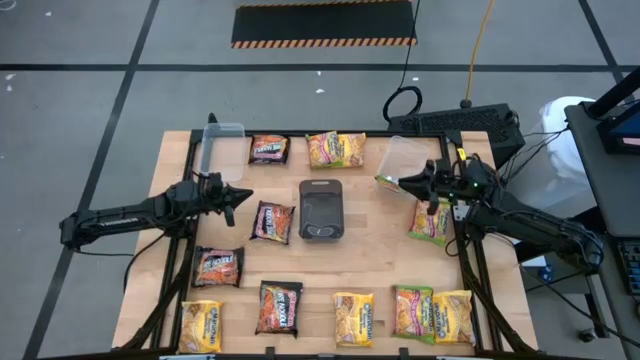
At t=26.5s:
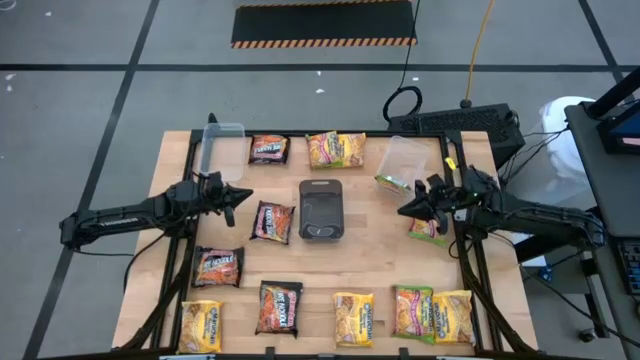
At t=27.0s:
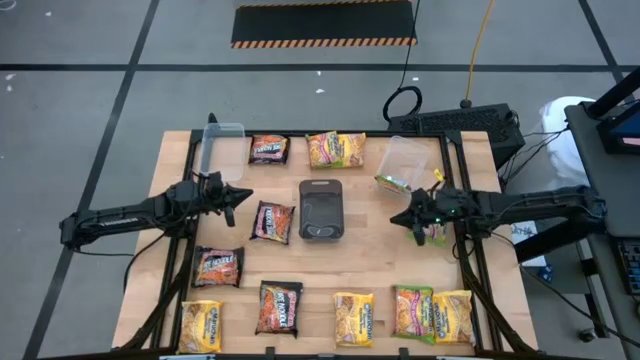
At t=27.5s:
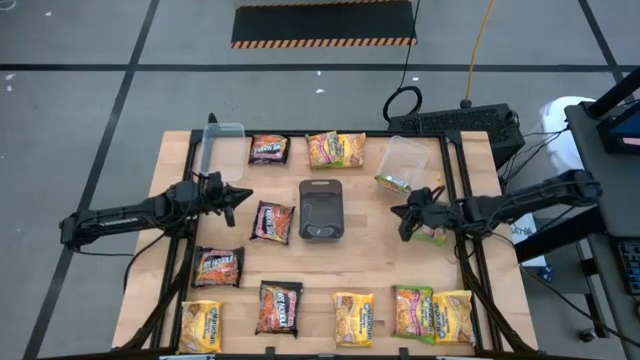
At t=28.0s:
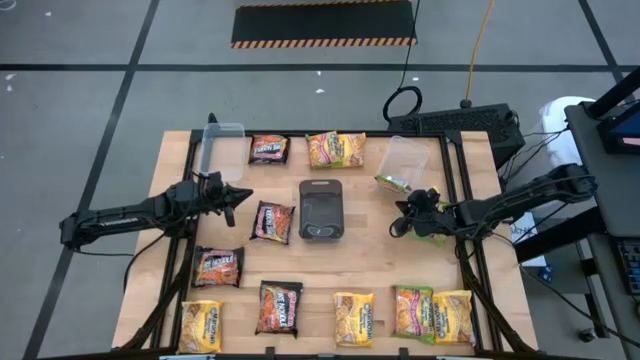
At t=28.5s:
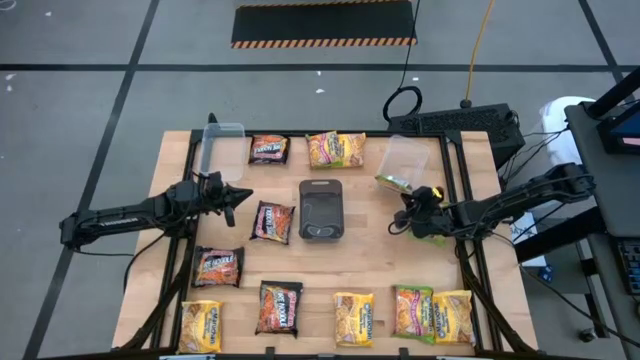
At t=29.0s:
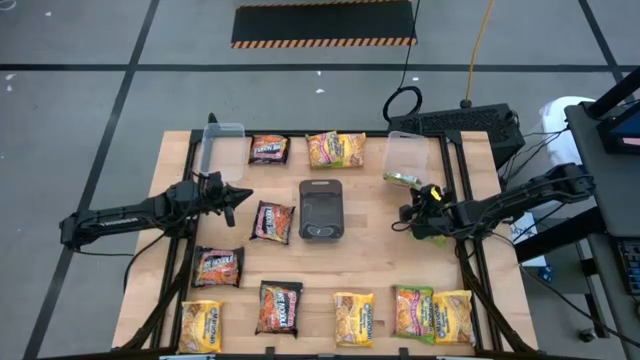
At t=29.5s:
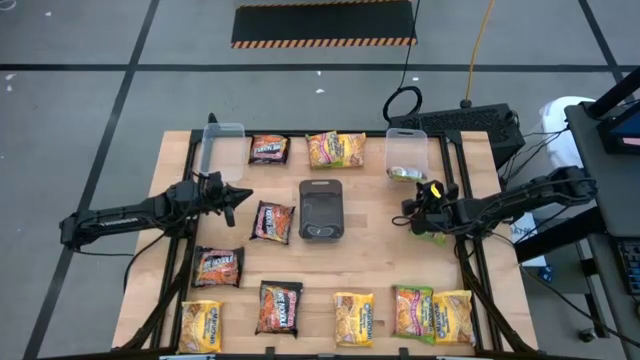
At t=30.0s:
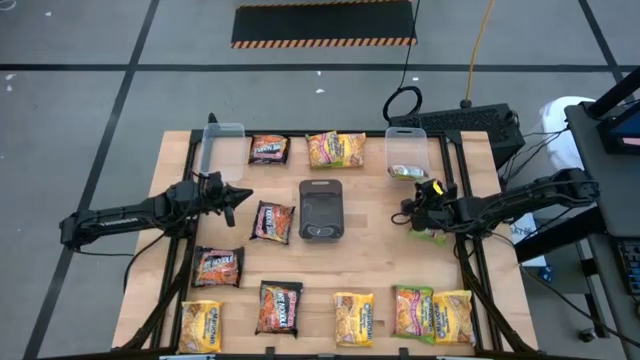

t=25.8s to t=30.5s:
Task: Sort Maruchan noodles
Adjust the right transparent bin

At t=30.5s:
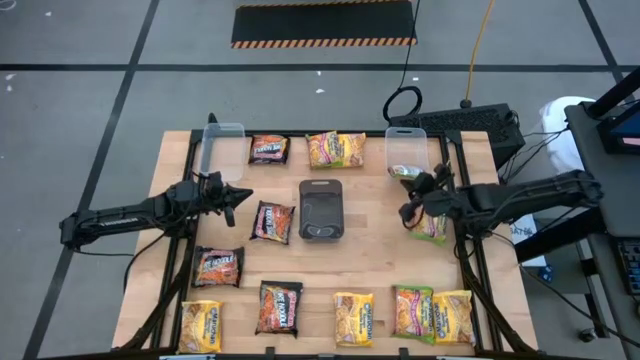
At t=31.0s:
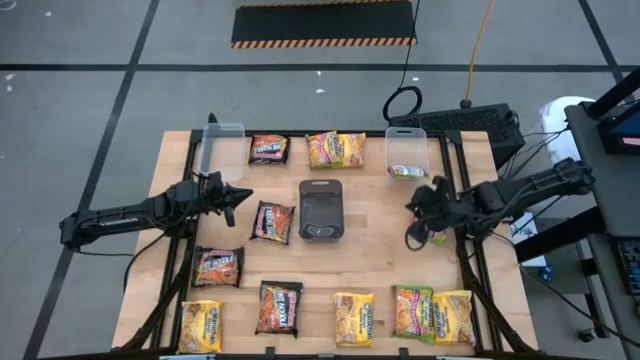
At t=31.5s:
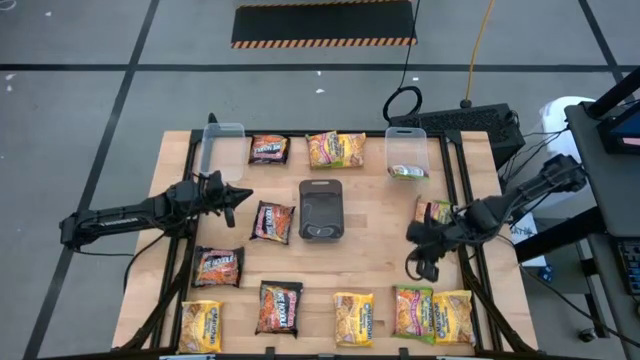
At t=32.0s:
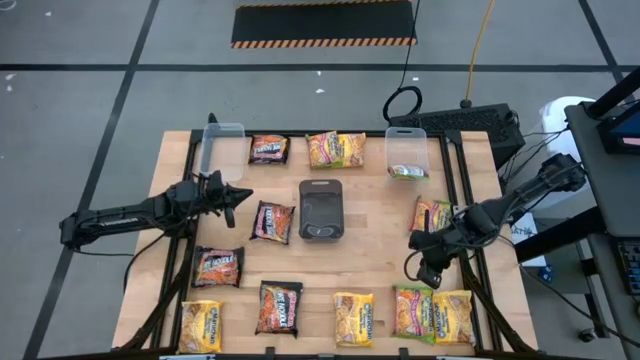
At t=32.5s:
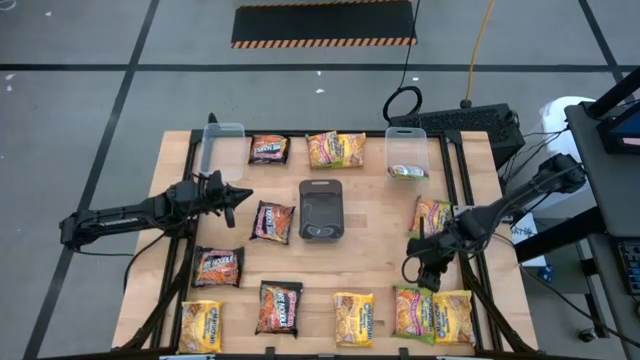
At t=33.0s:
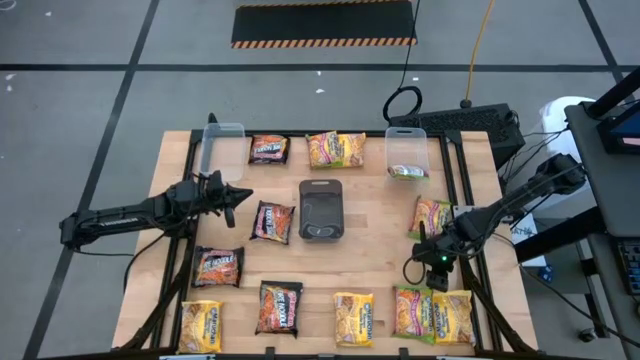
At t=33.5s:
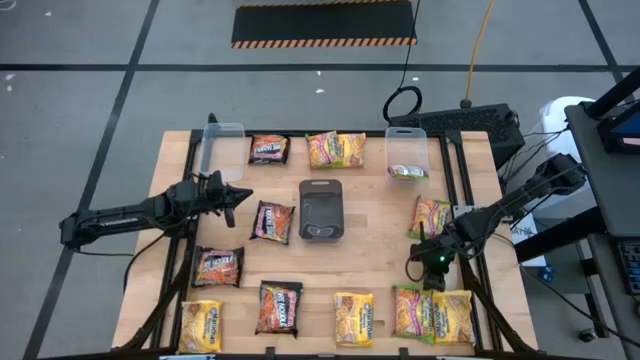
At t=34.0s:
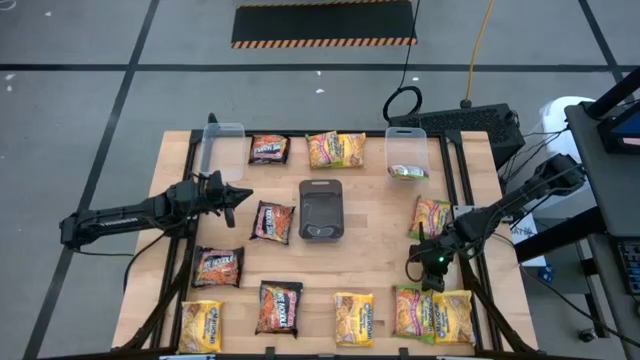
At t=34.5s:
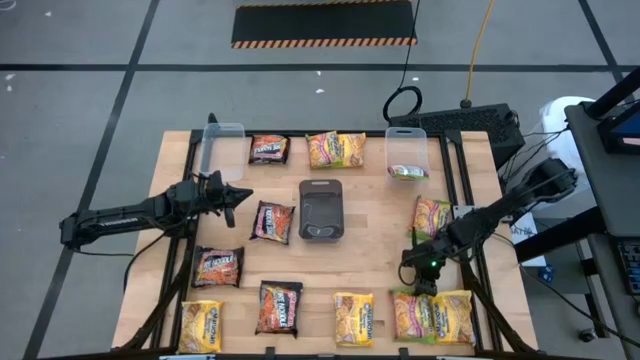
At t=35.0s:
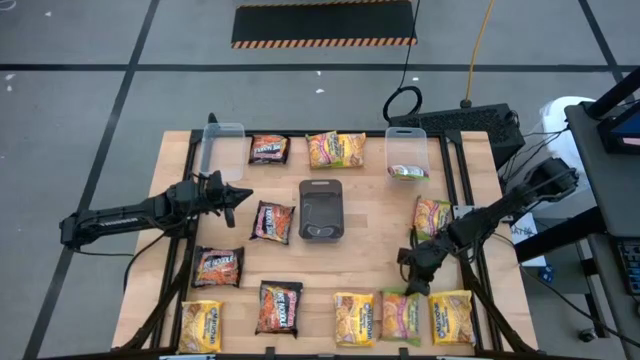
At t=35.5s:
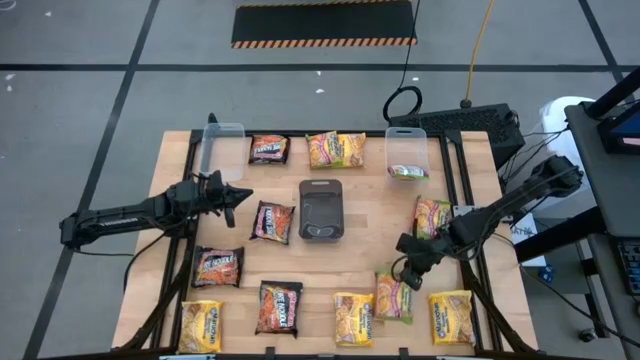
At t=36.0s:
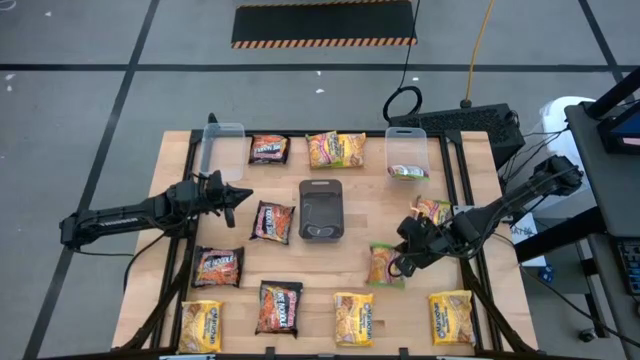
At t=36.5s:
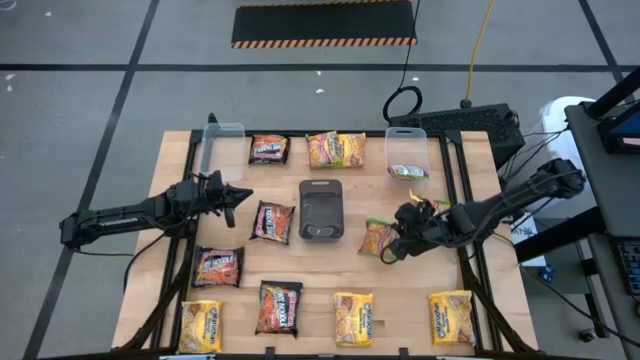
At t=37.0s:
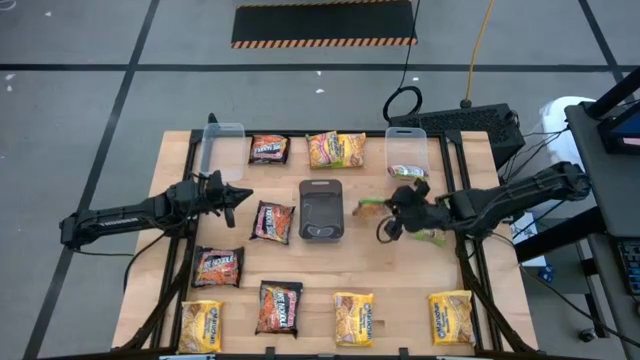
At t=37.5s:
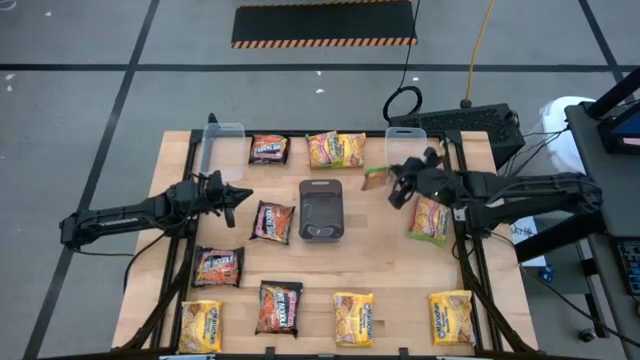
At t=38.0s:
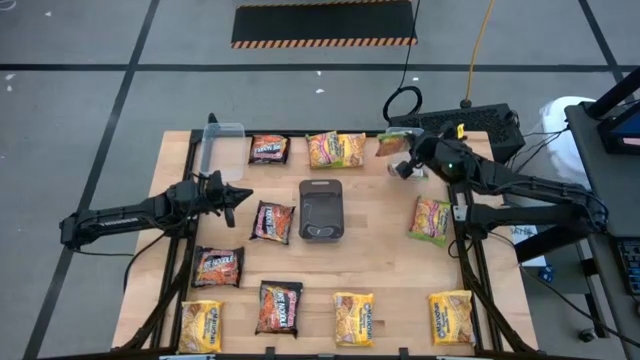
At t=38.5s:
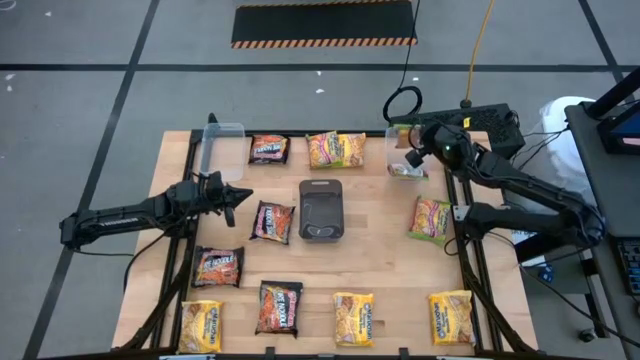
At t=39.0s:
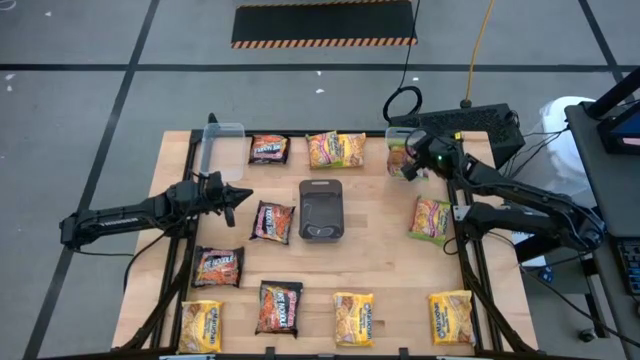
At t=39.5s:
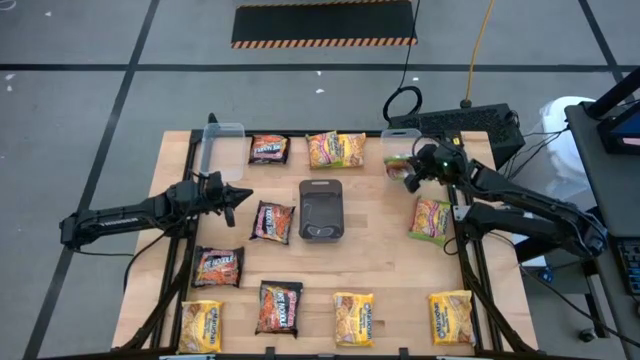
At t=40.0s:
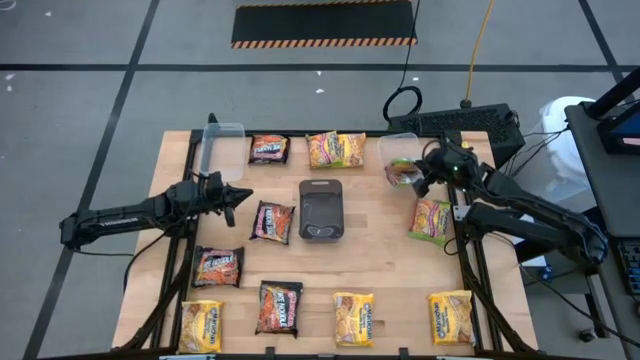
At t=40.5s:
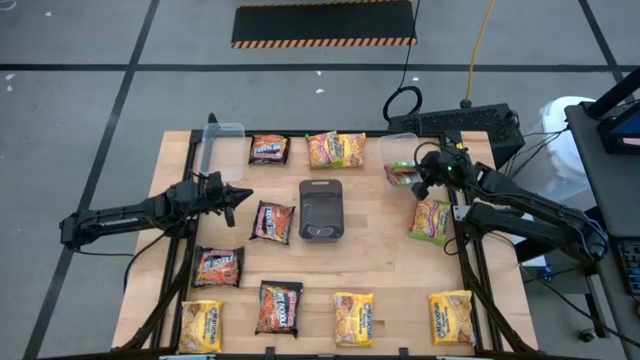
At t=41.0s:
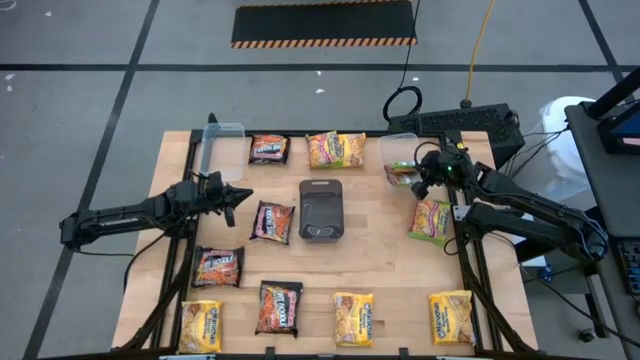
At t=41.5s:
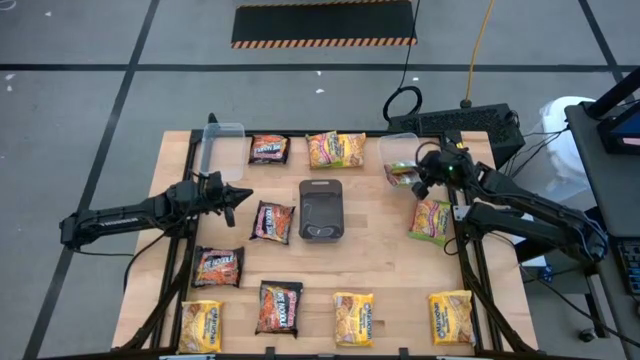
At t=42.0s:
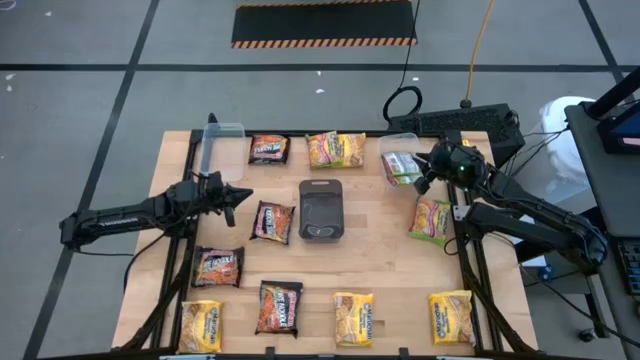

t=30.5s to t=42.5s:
Put the bottom green noodle pack into the right transparent bin
